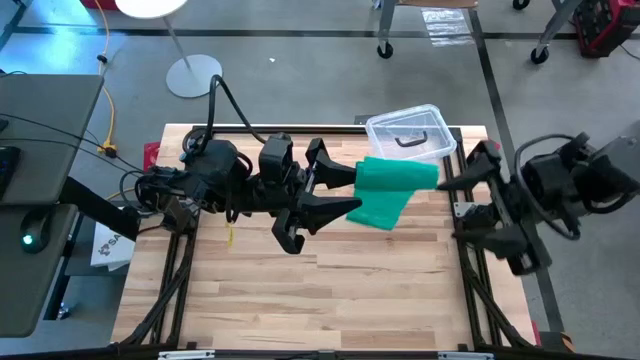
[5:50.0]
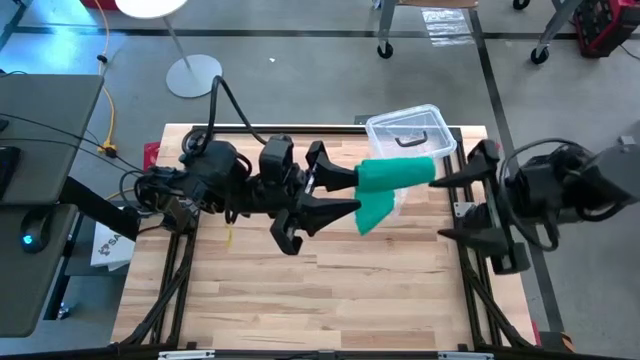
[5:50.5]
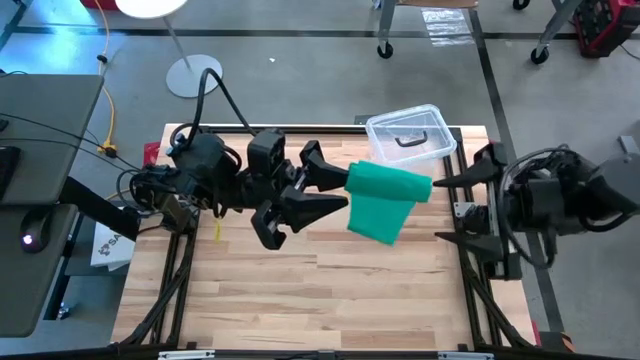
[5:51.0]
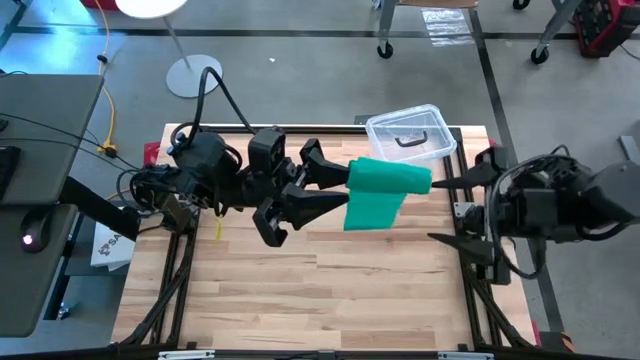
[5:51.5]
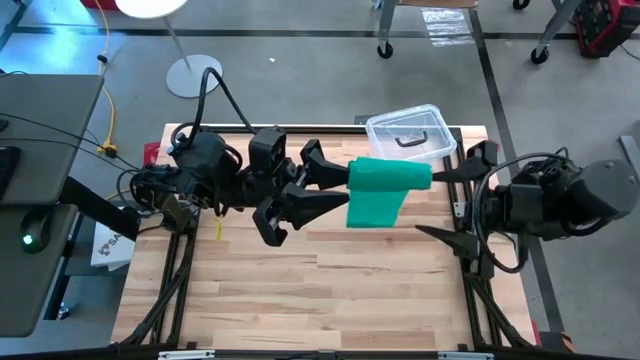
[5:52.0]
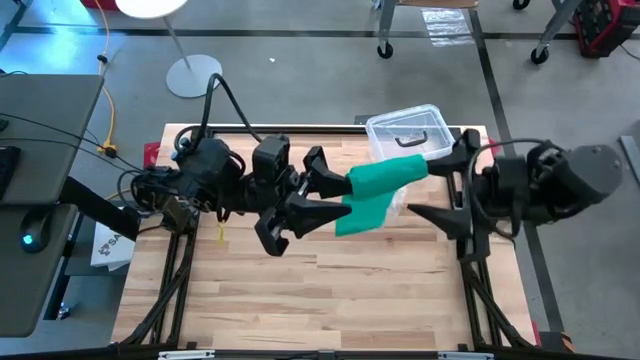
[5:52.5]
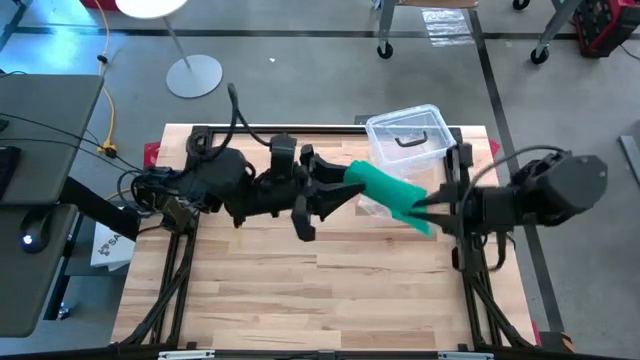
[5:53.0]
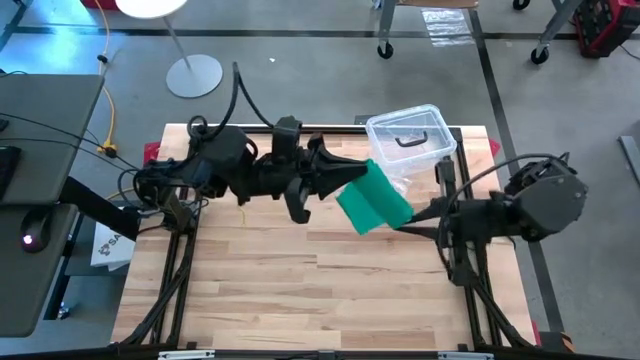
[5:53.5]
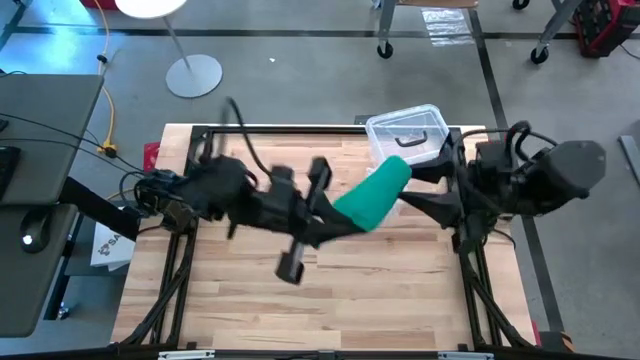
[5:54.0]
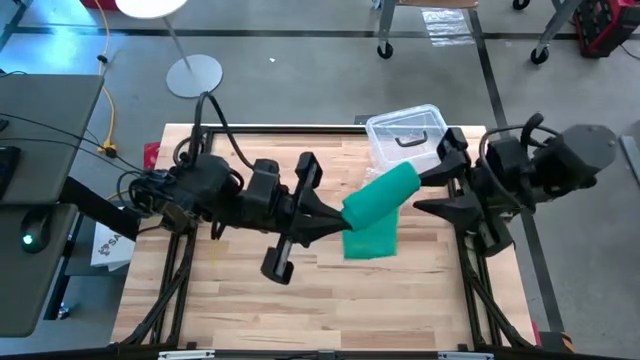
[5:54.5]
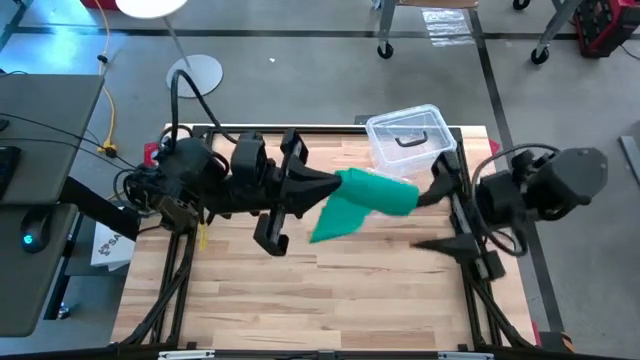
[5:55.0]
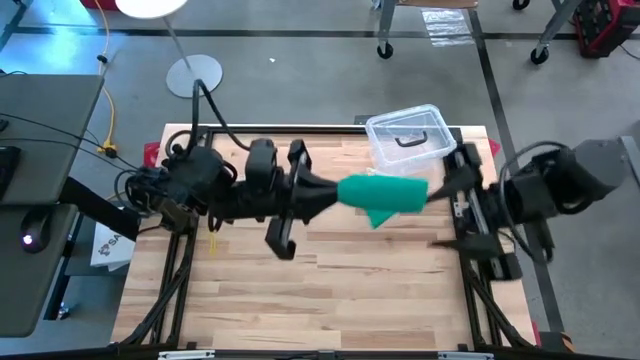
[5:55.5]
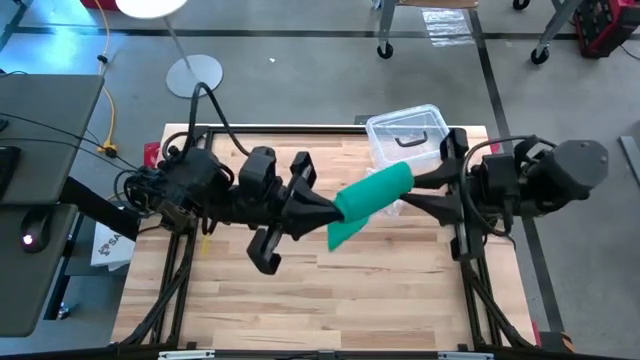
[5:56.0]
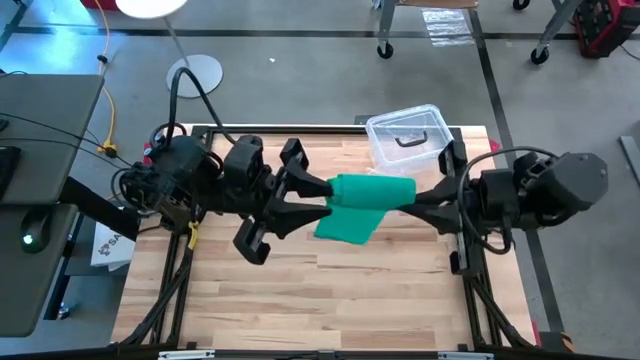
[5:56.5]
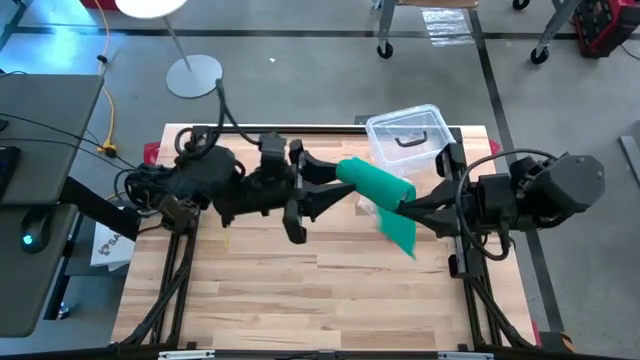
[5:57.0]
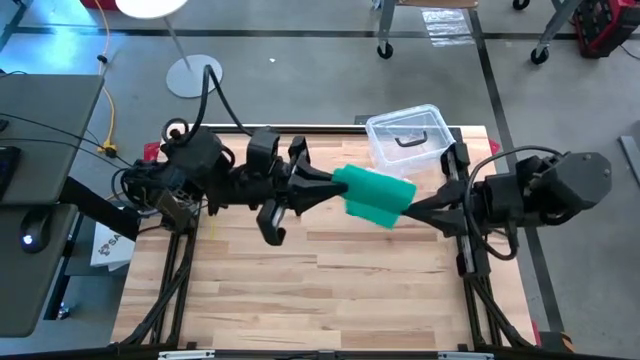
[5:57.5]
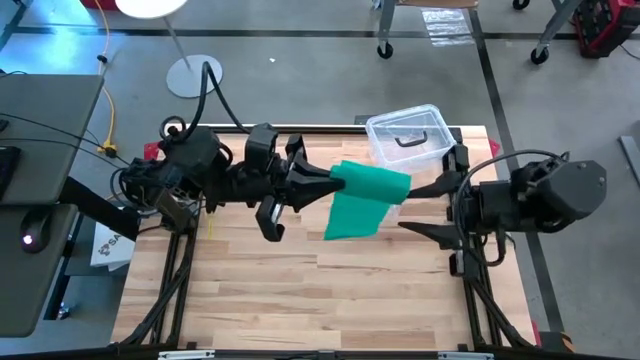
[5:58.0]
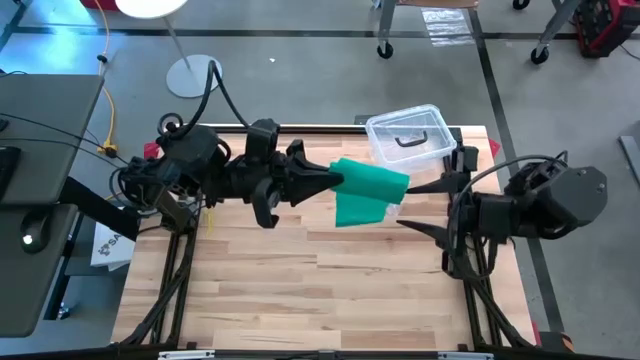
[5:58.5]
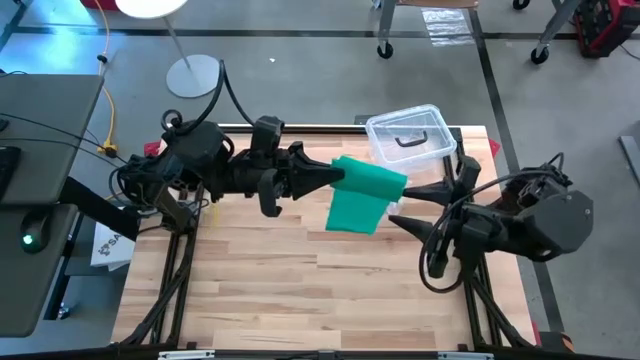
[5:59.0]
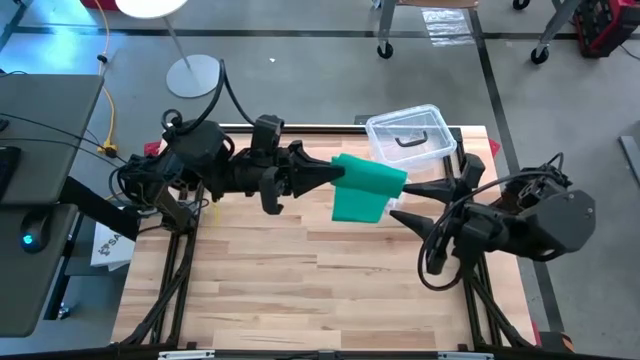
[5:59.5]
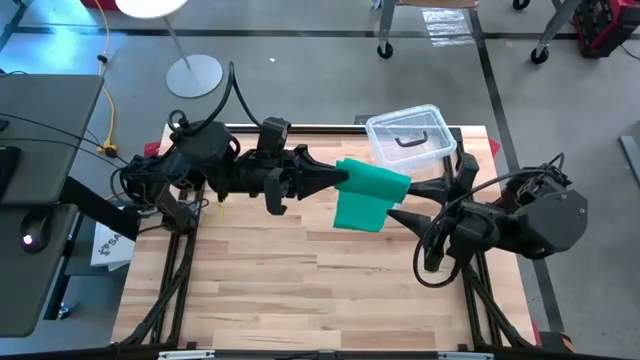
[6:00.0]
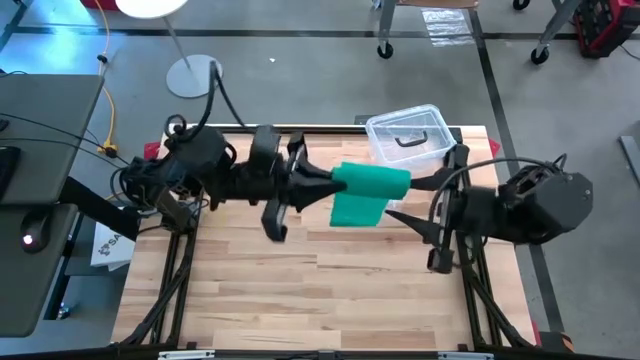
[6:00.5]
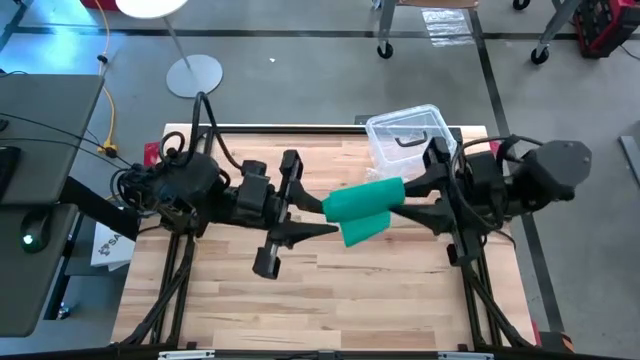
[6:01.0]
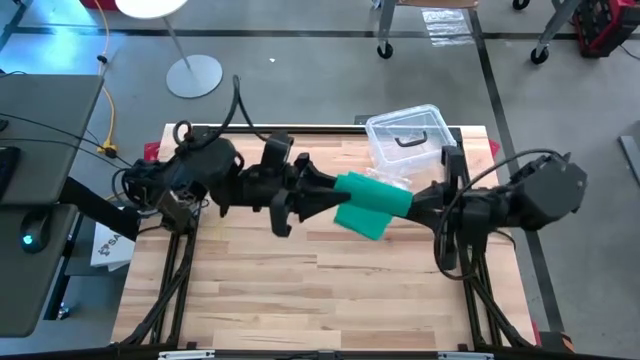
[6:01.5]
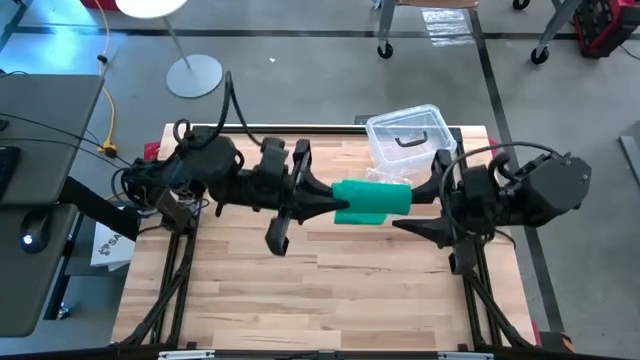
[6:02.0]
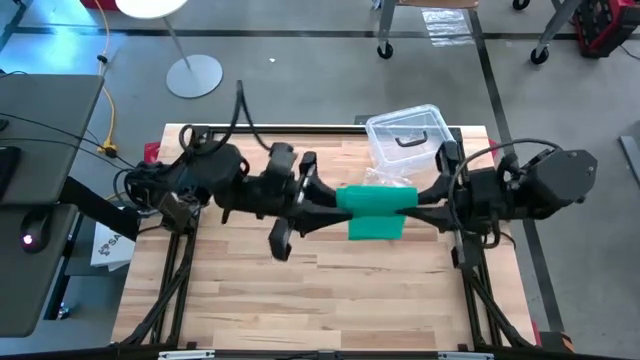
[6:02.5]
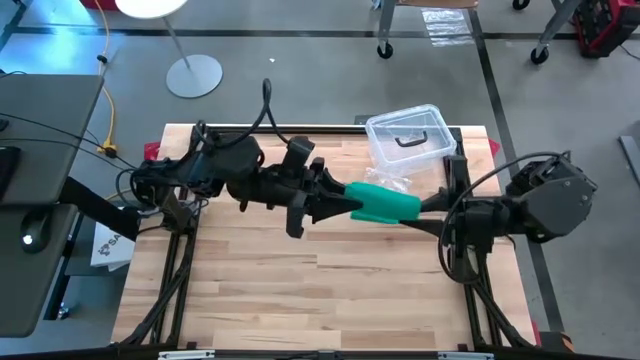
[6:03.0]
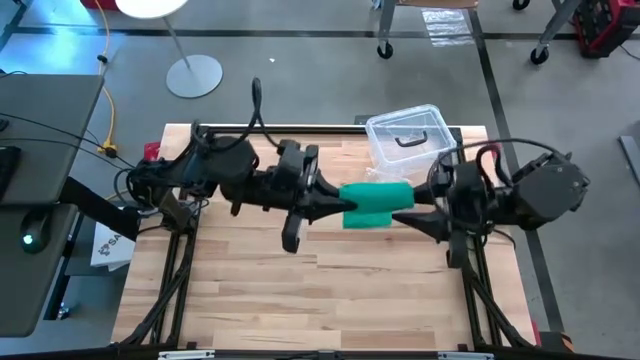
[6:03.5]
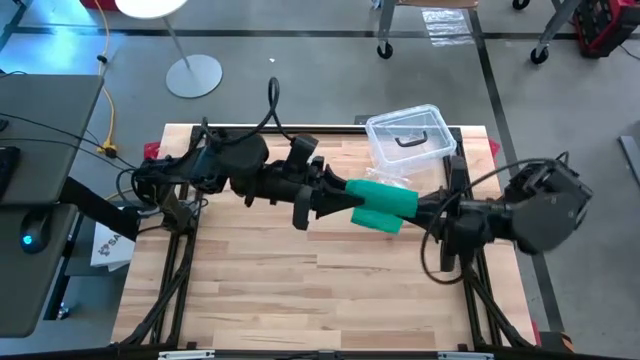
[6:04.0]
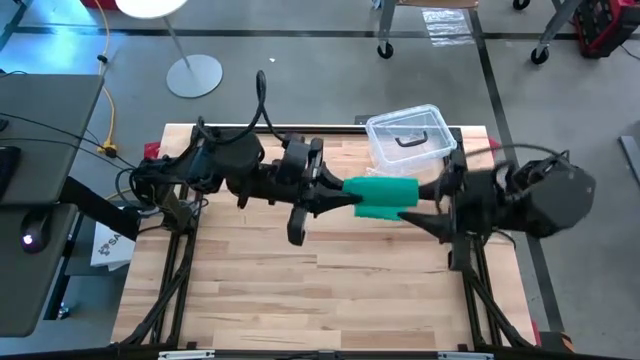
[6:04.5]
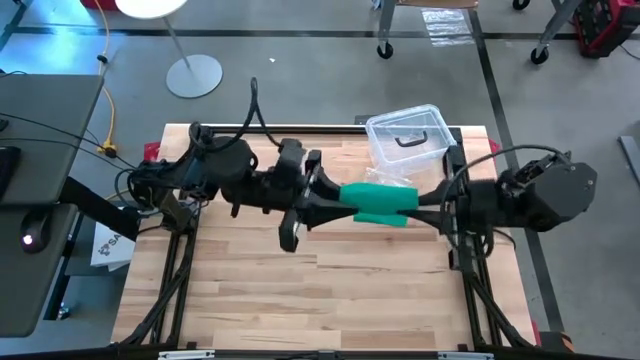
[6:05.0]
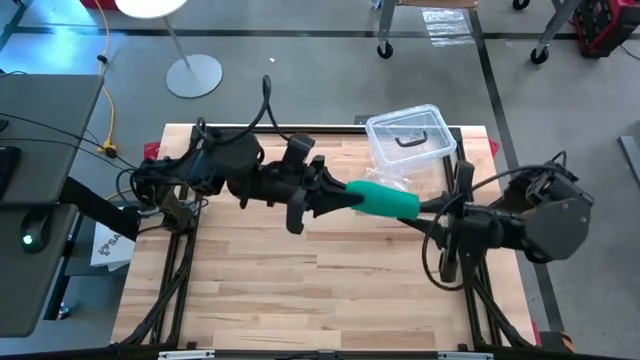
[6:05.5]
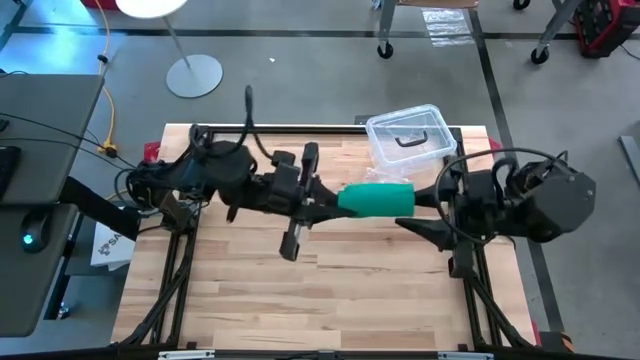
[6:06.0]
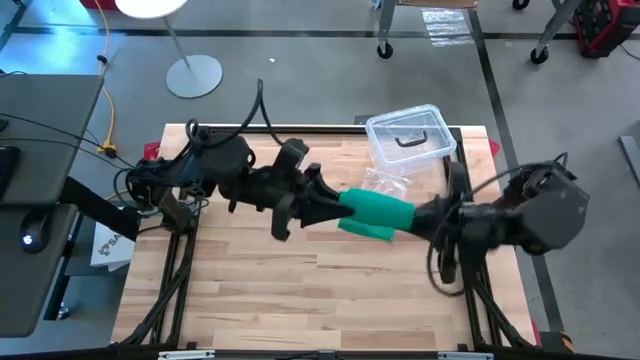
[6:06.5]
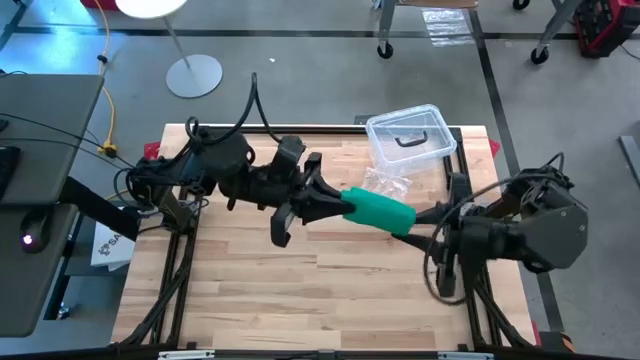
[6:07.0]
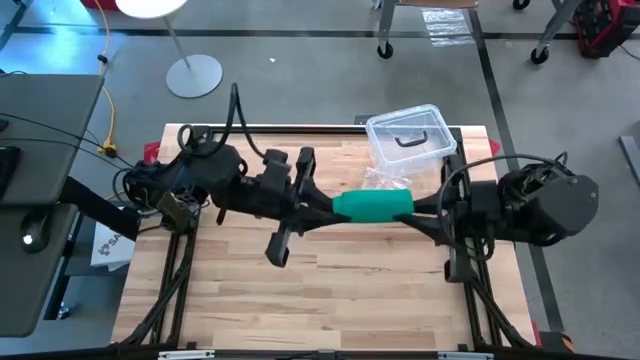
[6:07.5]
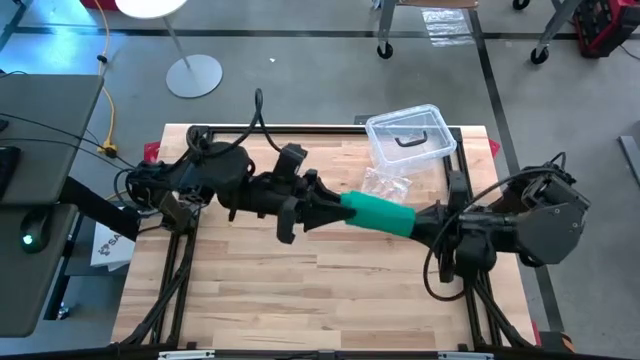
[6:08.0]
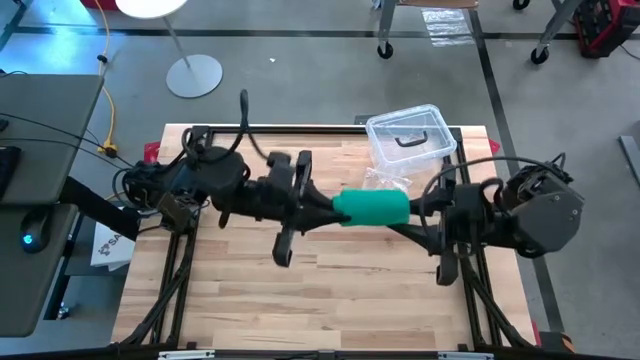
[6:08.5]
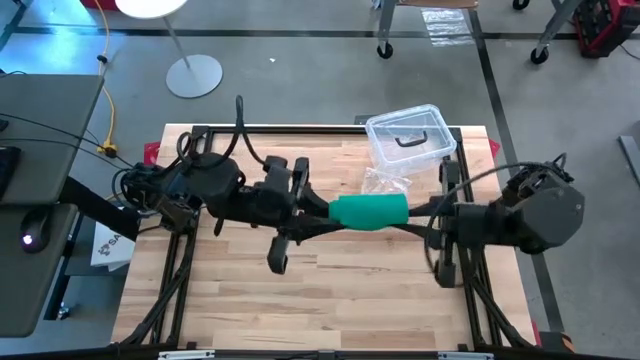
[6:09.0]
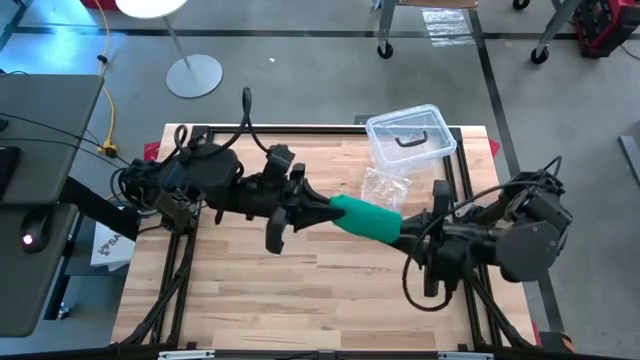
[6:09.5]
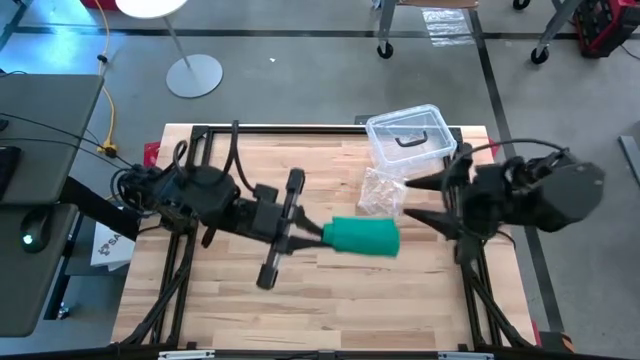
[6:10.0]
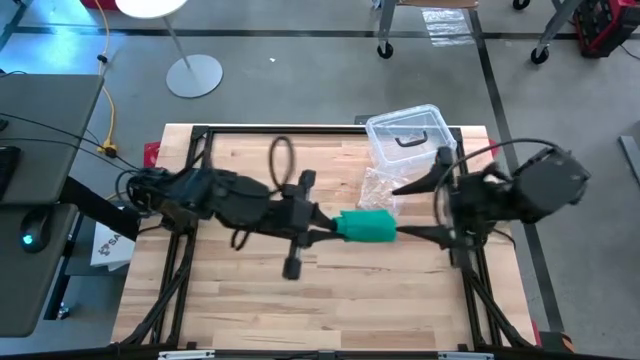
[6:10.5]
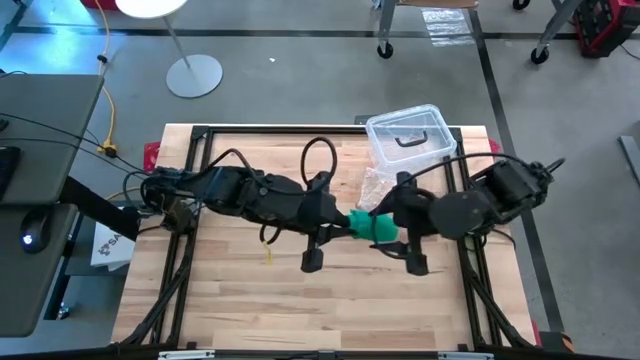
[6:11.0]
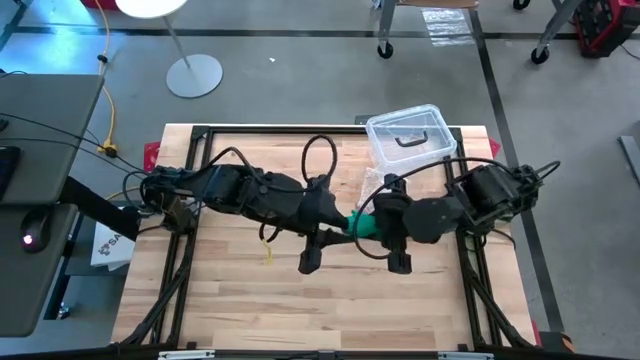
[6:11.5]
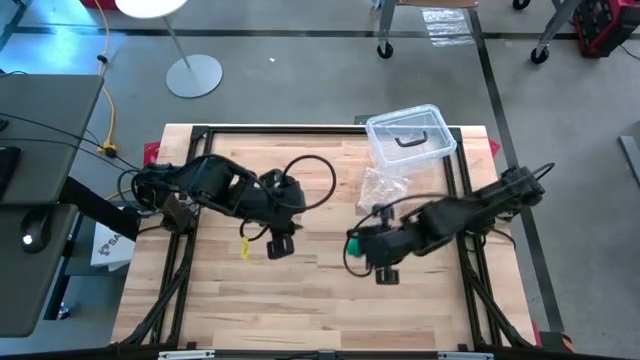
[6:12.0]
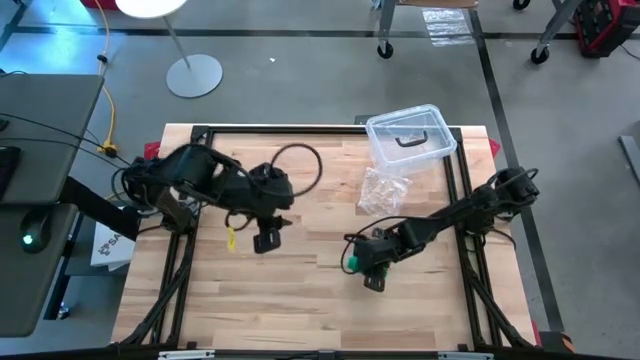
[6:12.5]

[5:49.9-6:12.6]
Task: Roll bandage
Roll the green bandage
